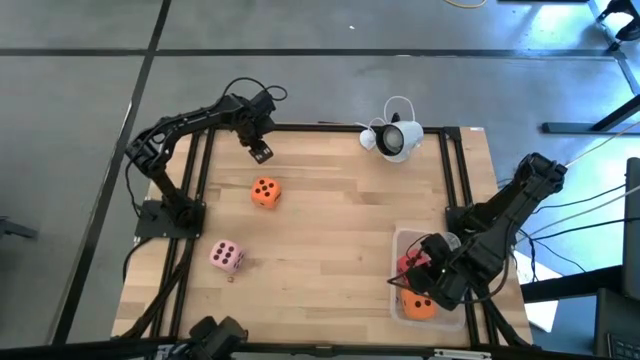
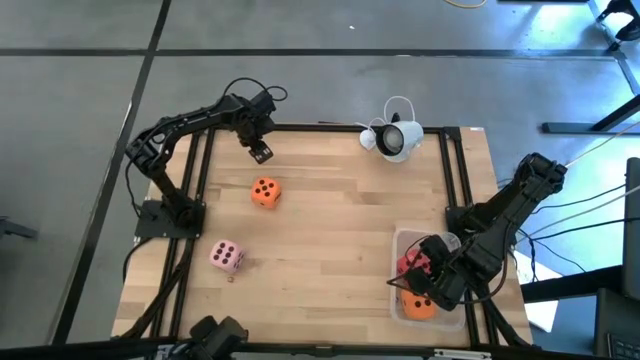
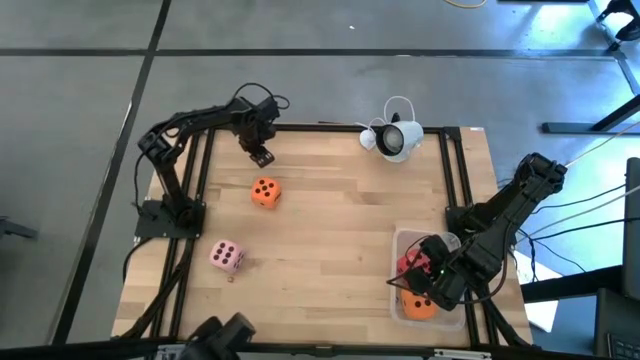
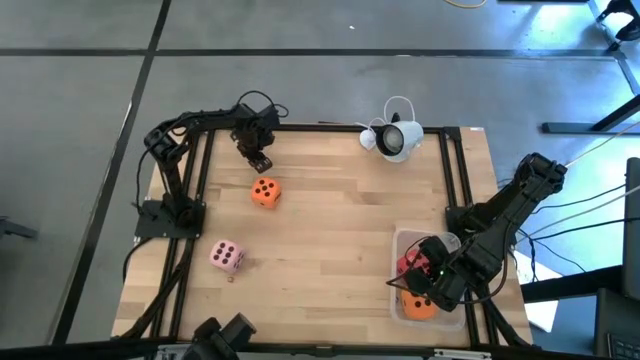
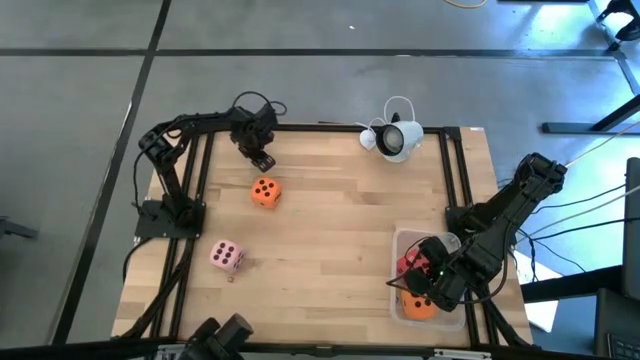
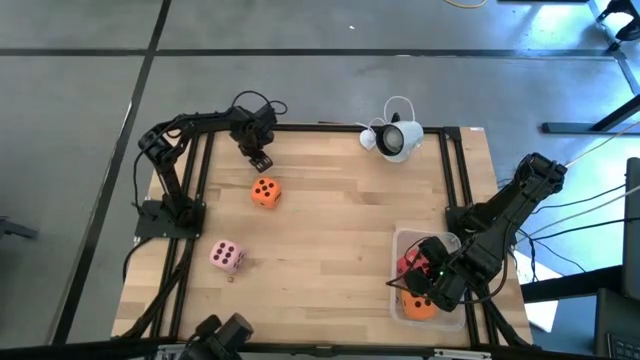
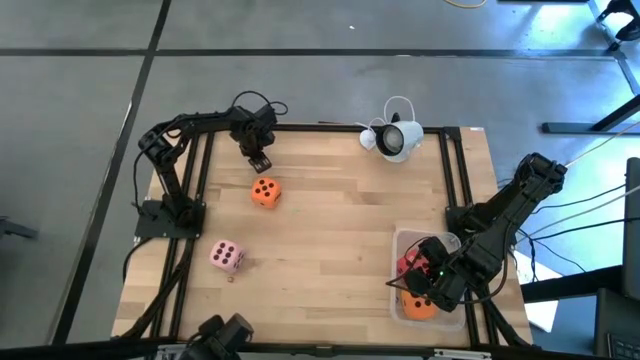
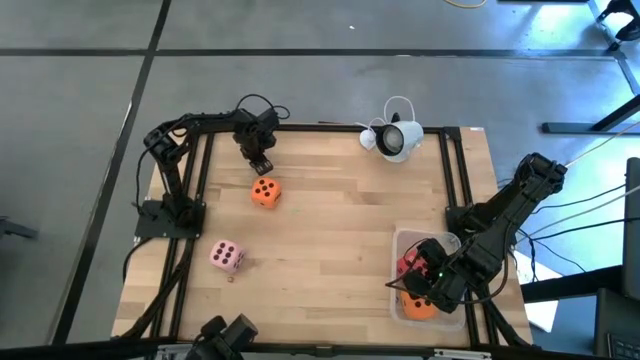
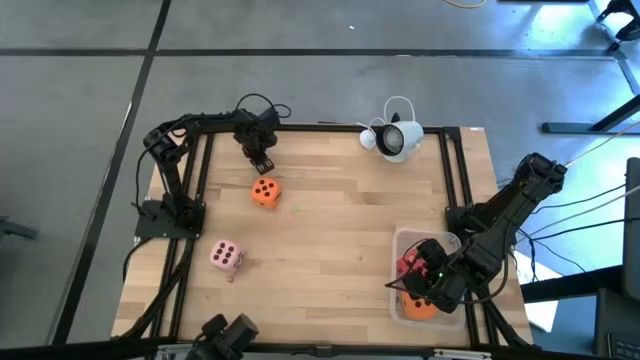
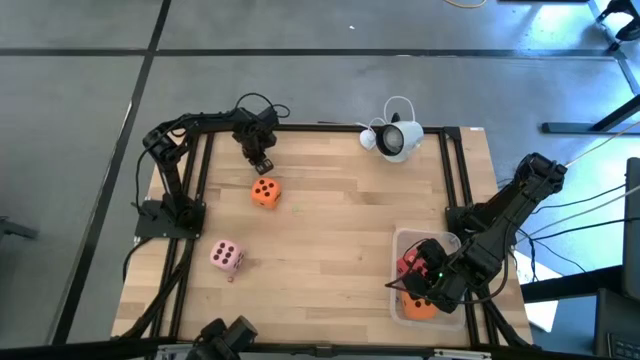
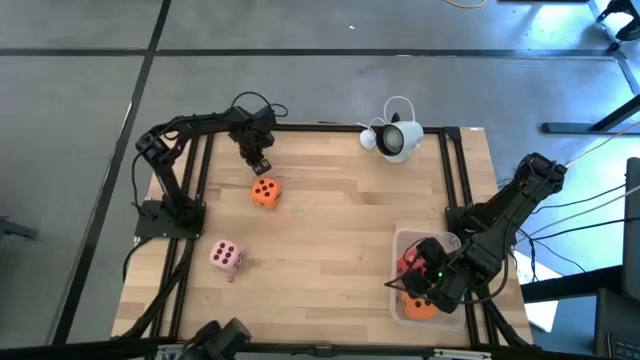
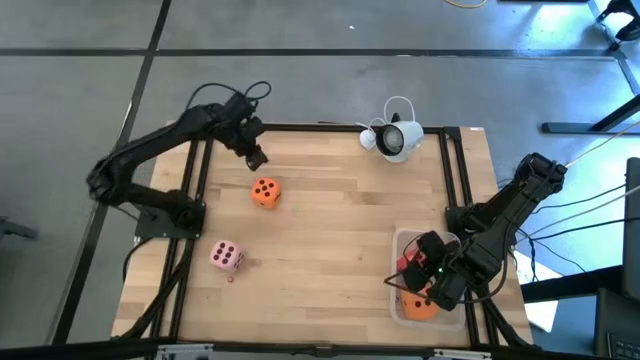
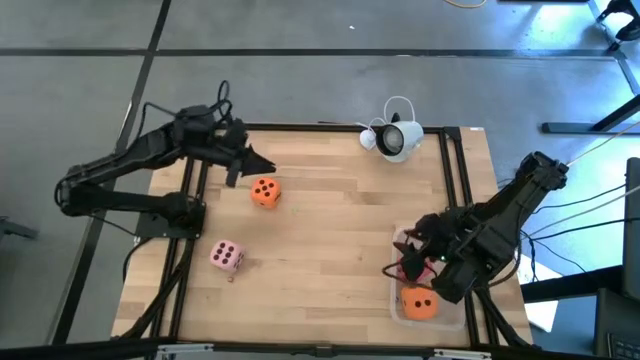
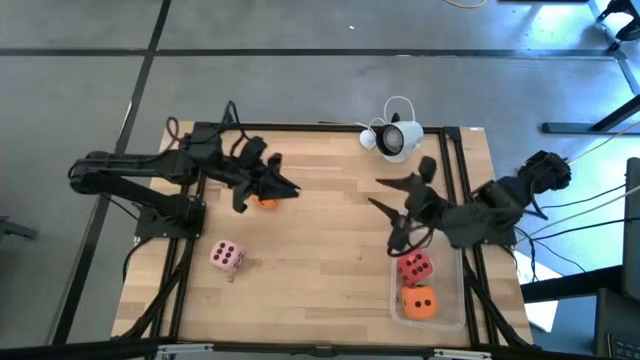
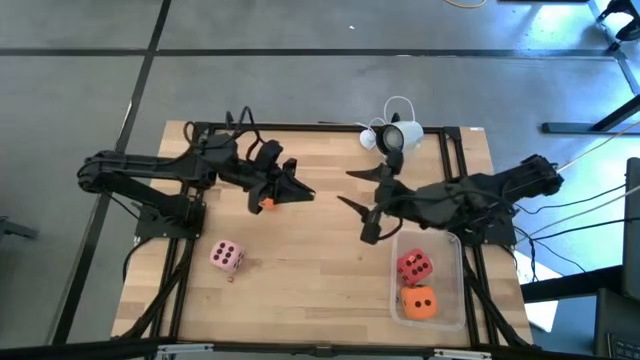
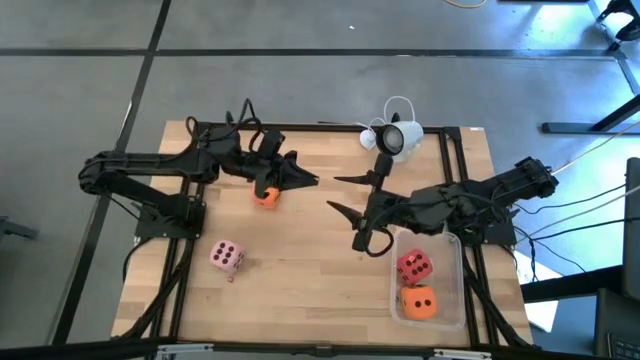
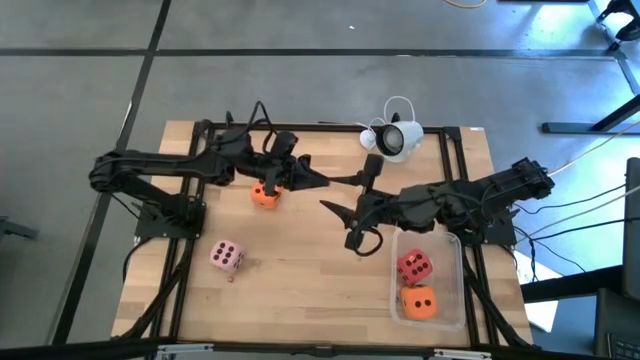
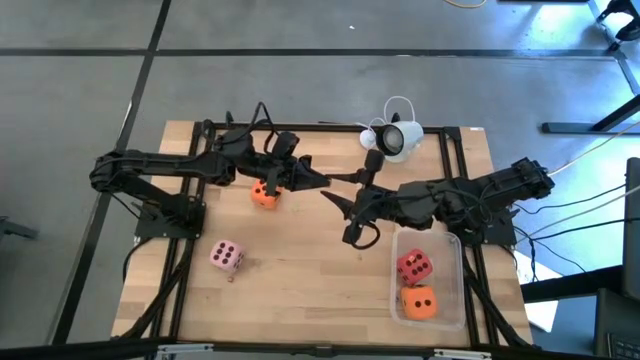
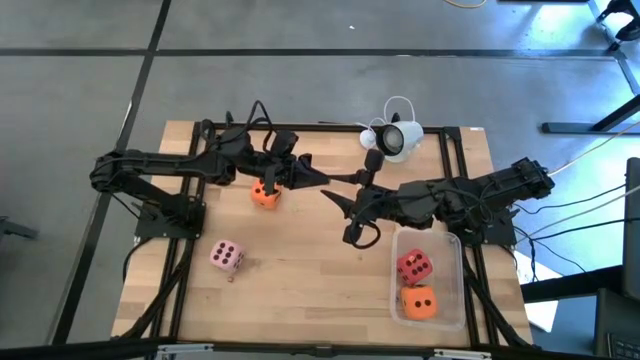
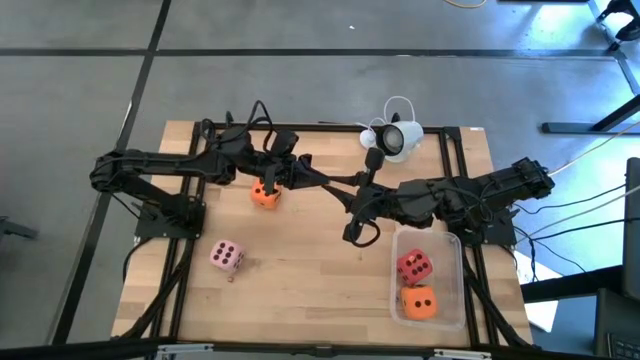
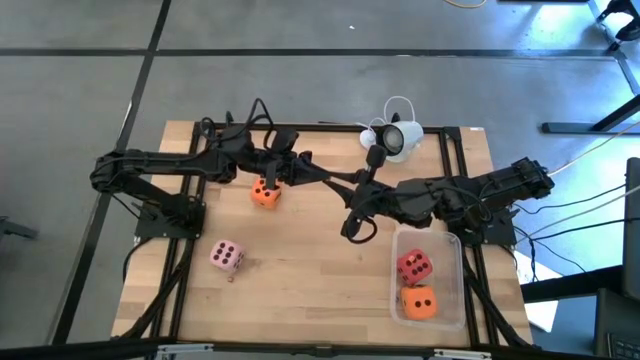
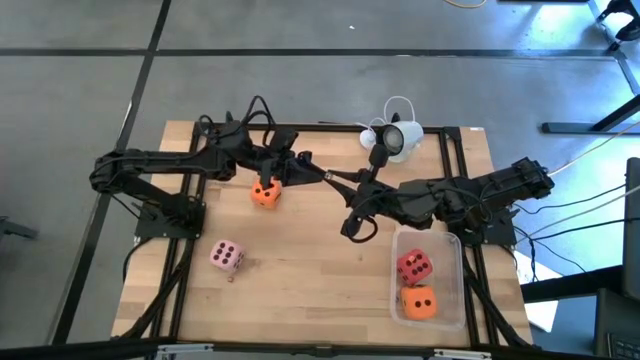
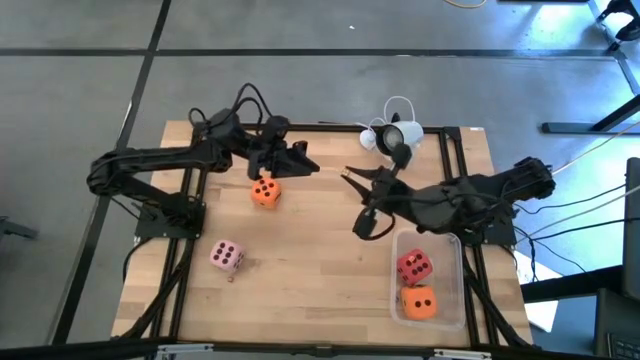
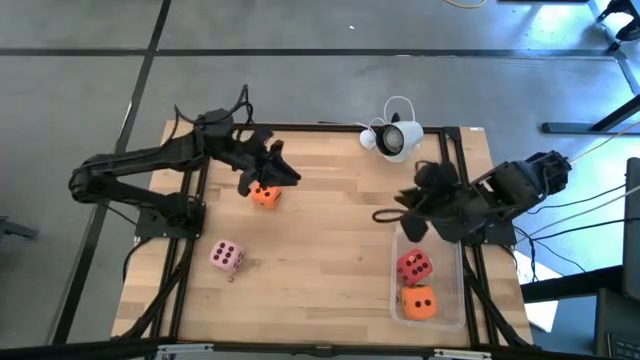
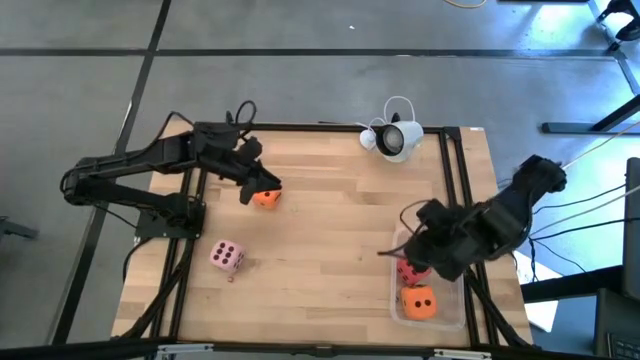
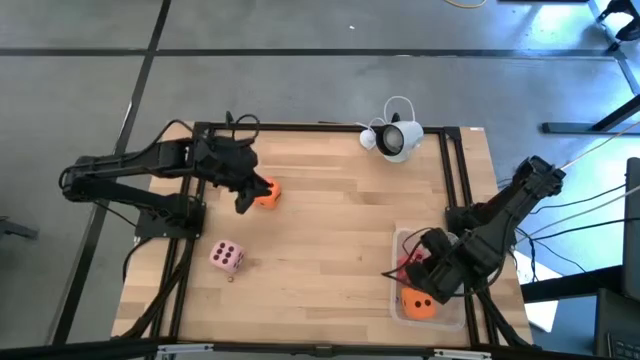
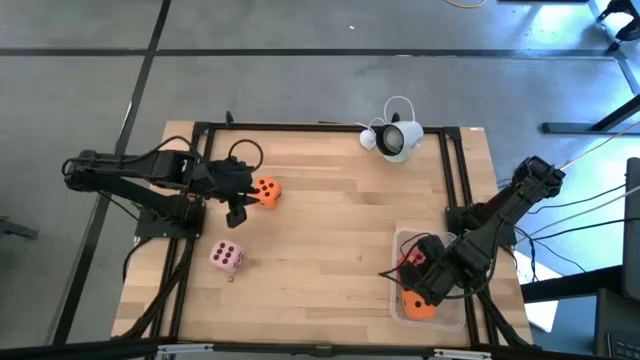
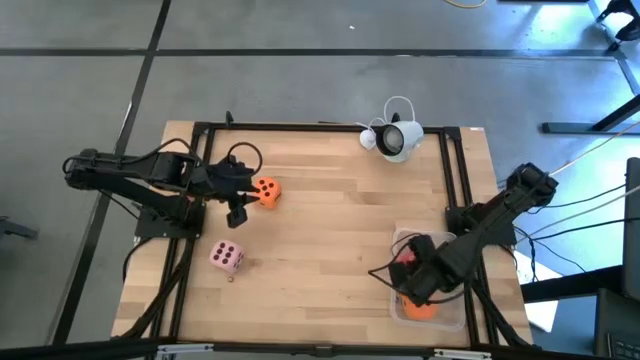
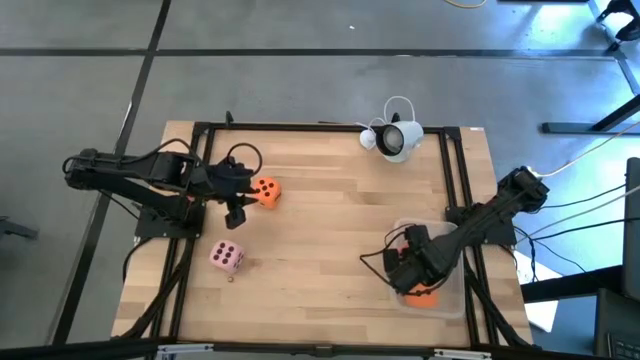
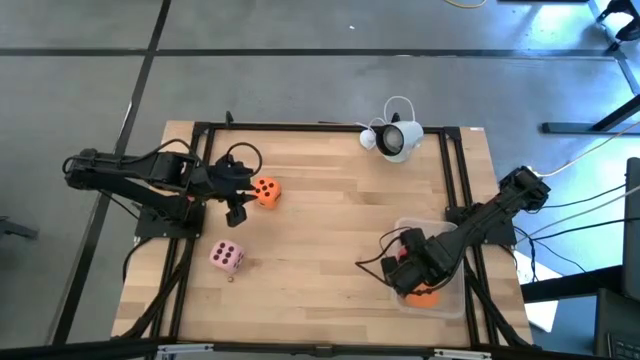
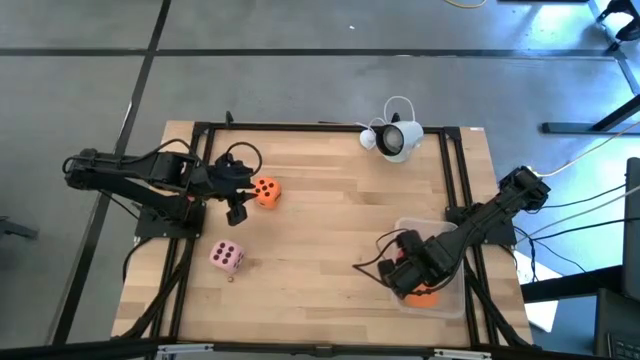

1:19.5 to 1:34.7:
Task: Pick & Place Dice
Put the small yellow die into the transparent bin

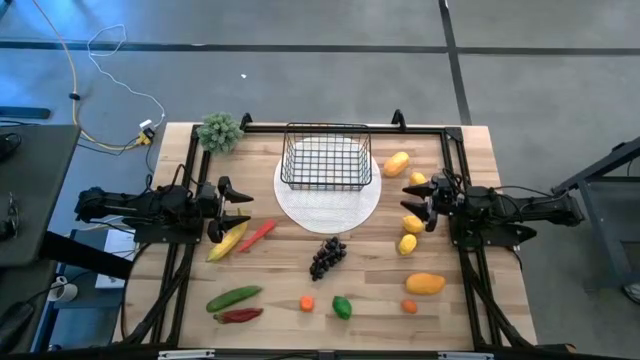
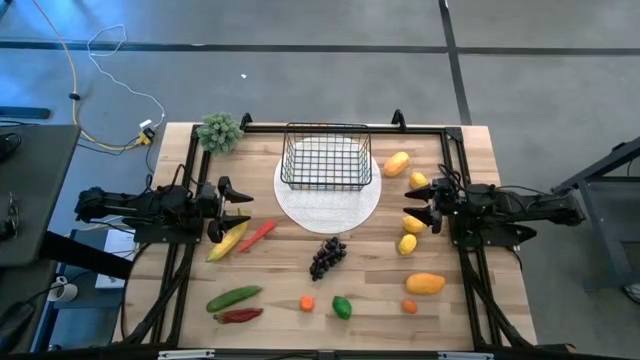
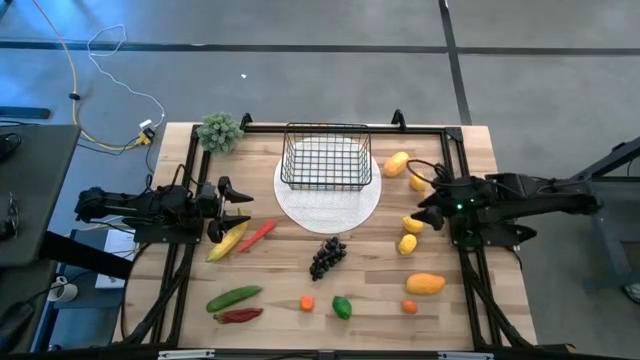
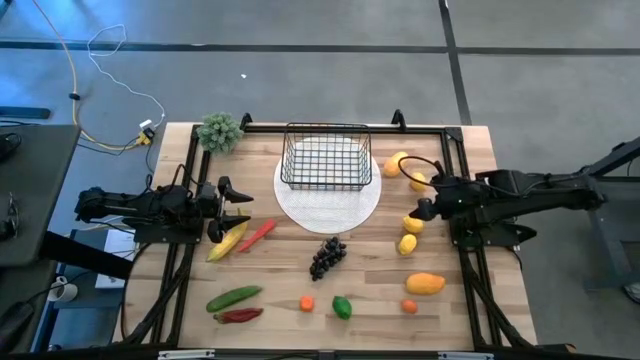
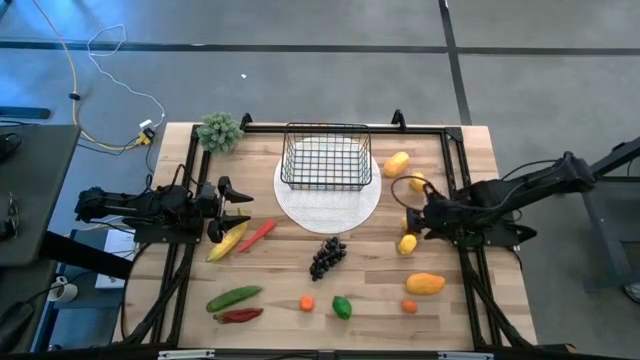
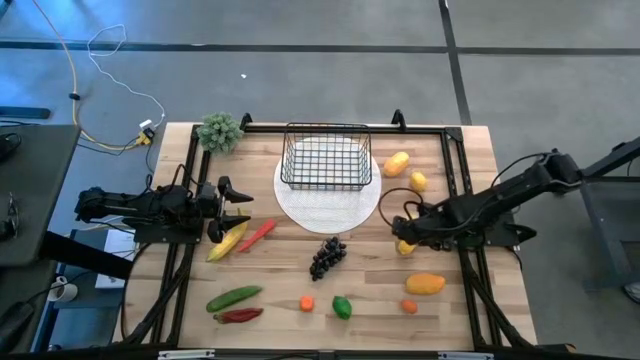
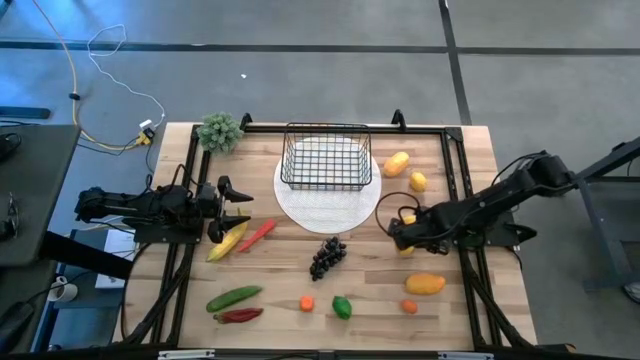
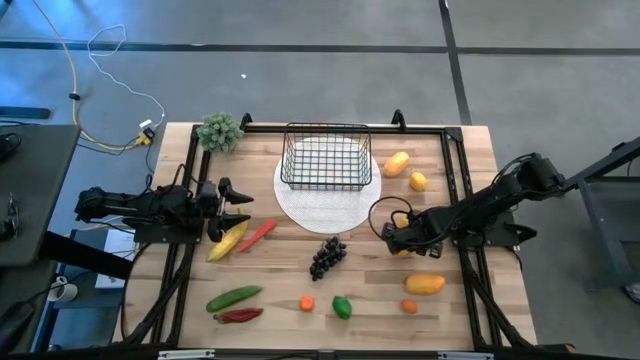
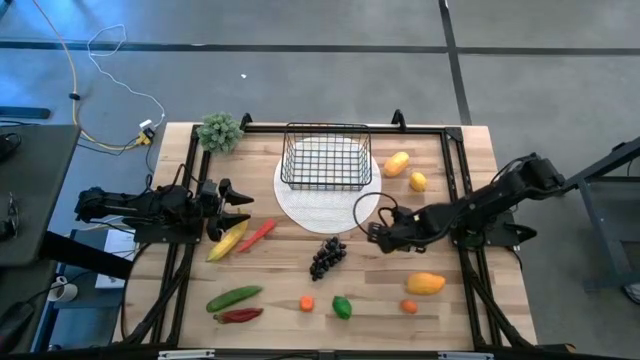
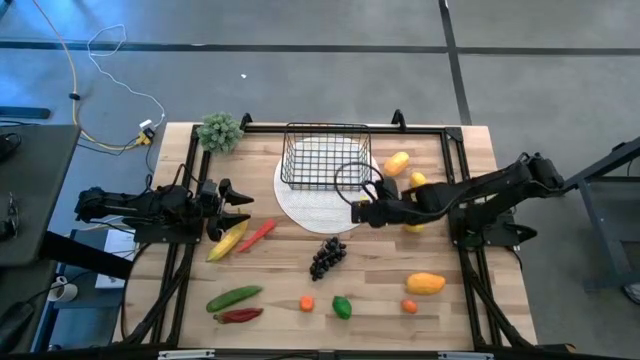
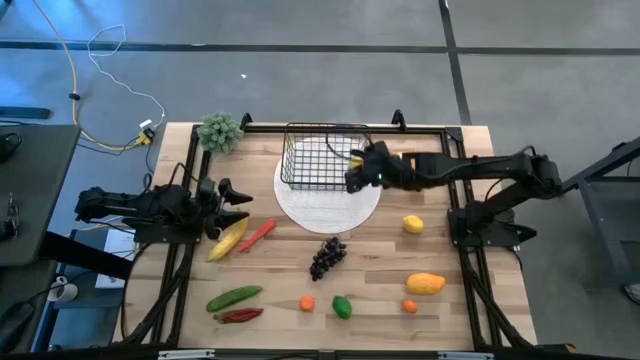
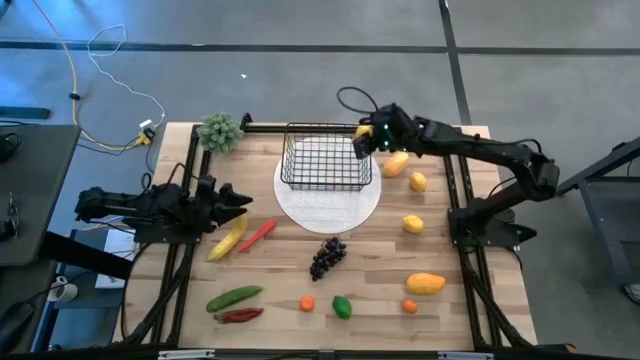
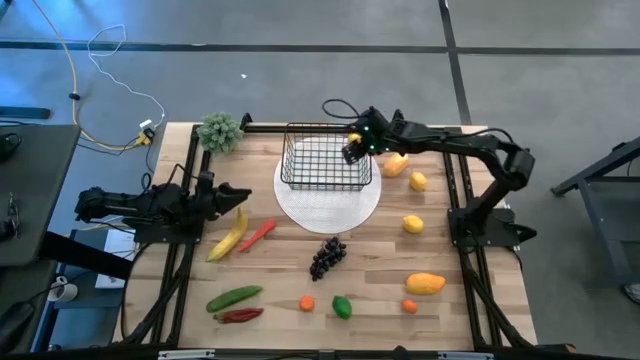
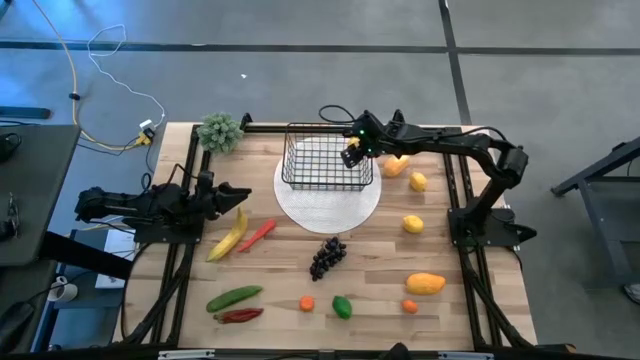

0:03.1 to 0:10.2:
Task: Build produce basket
Put the bottom yellow lemon into the black wire basket
